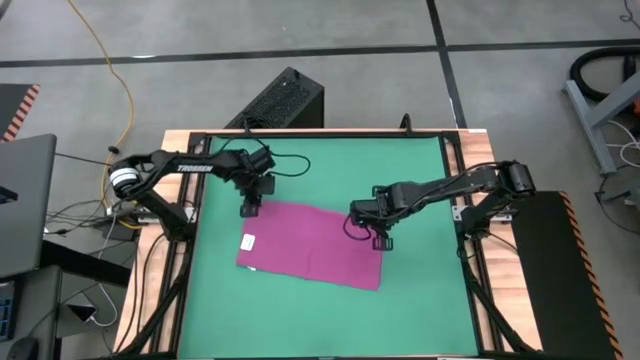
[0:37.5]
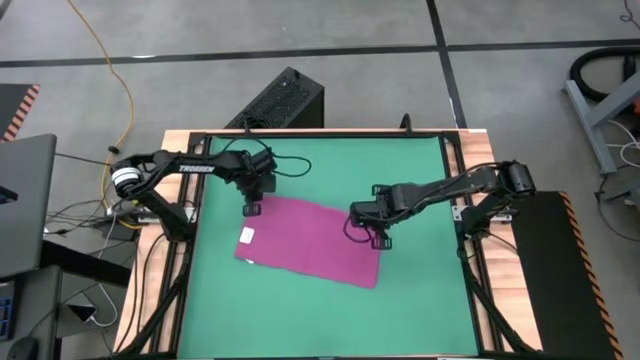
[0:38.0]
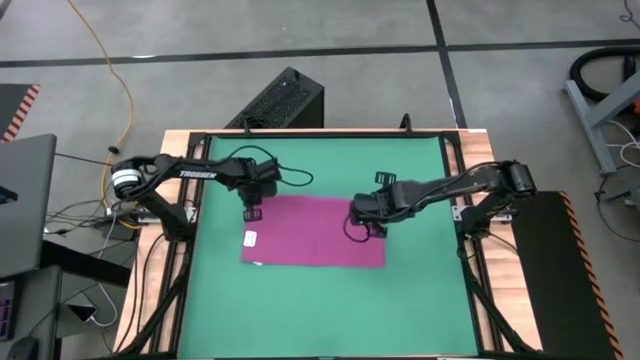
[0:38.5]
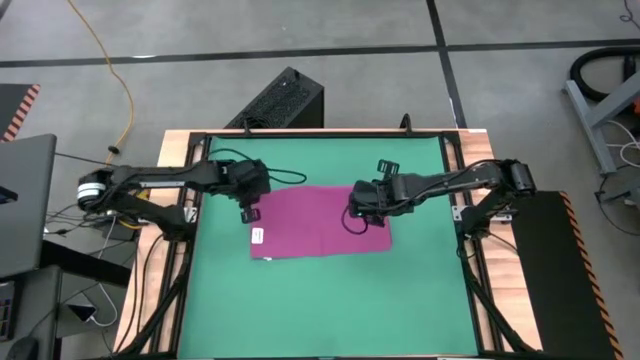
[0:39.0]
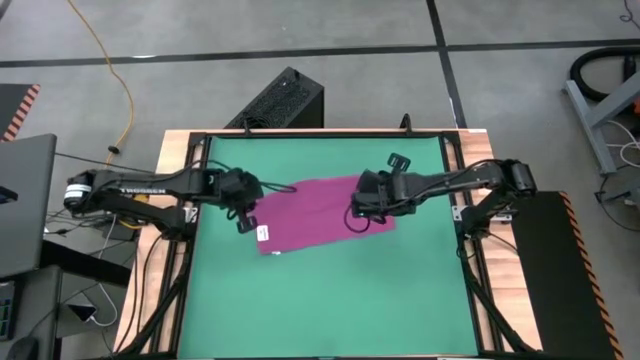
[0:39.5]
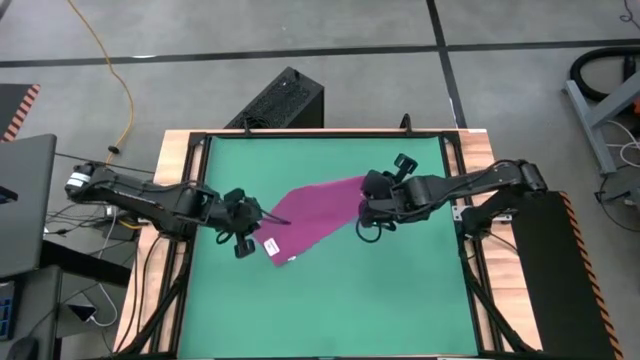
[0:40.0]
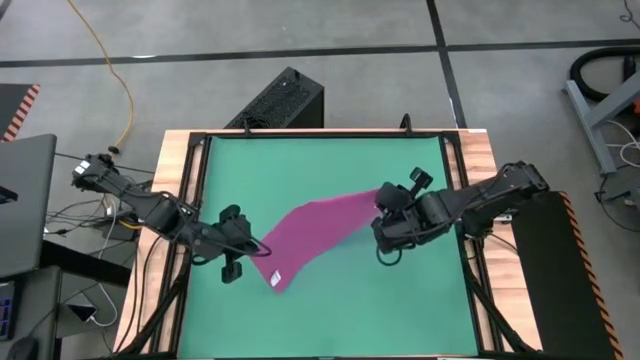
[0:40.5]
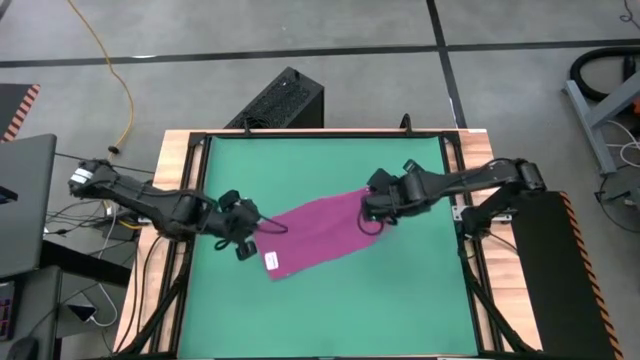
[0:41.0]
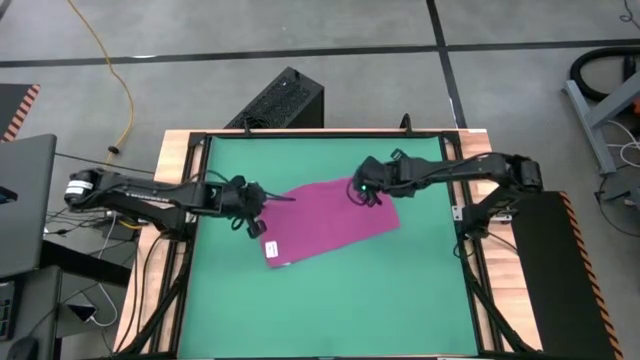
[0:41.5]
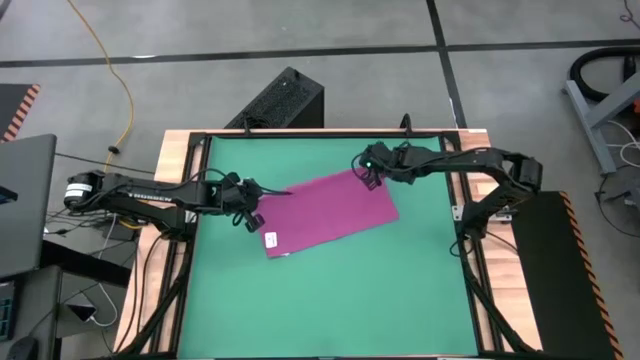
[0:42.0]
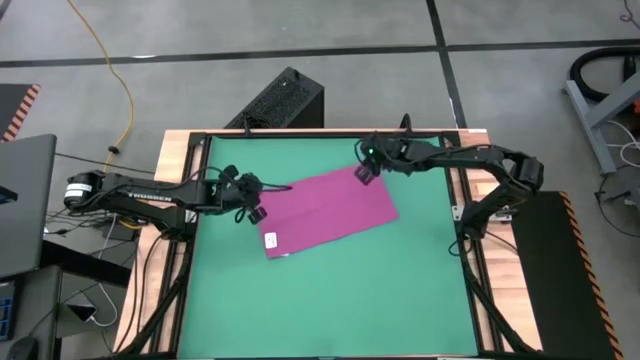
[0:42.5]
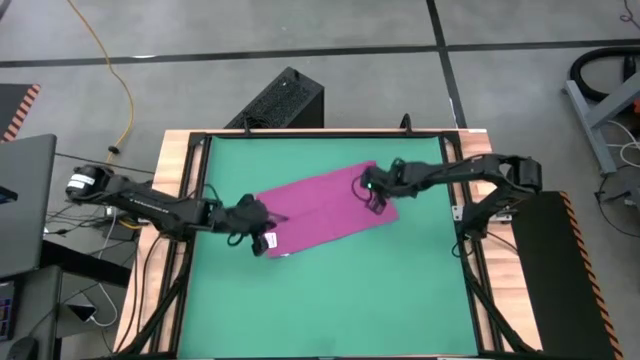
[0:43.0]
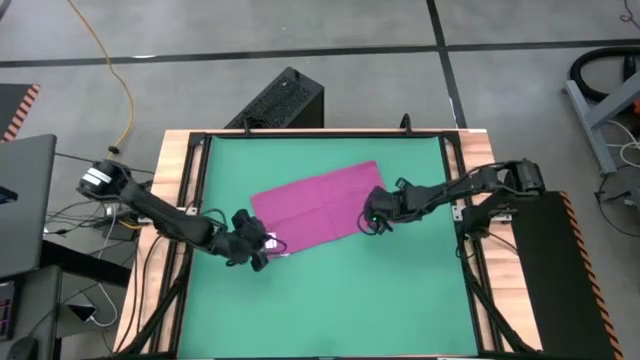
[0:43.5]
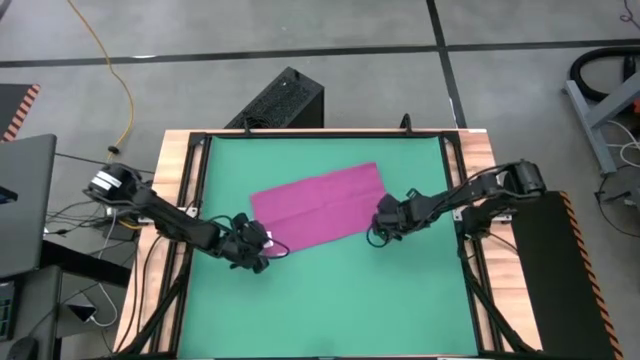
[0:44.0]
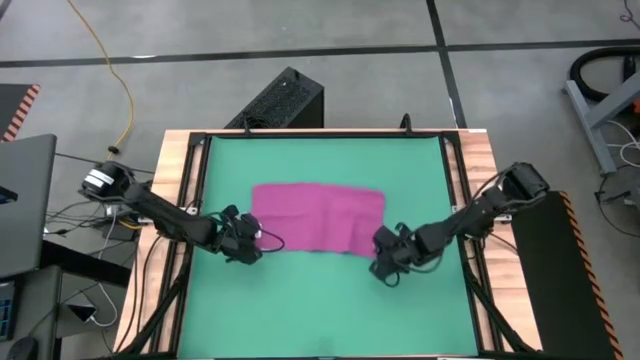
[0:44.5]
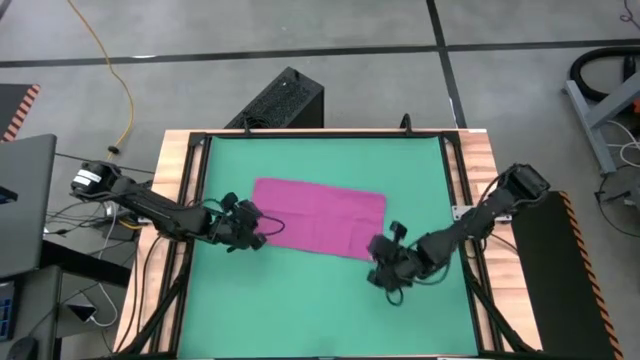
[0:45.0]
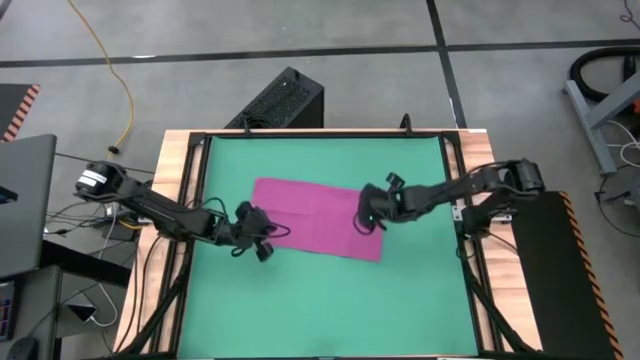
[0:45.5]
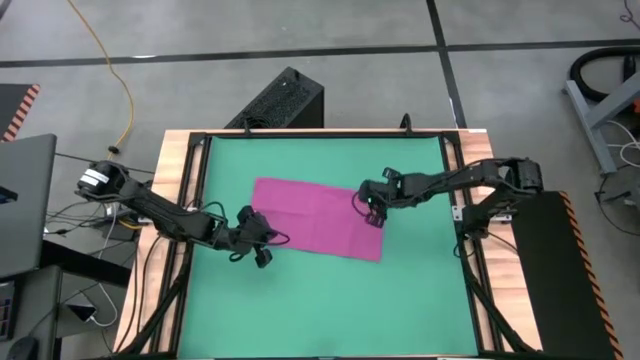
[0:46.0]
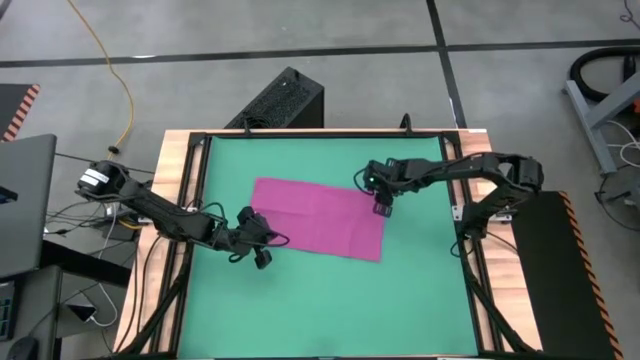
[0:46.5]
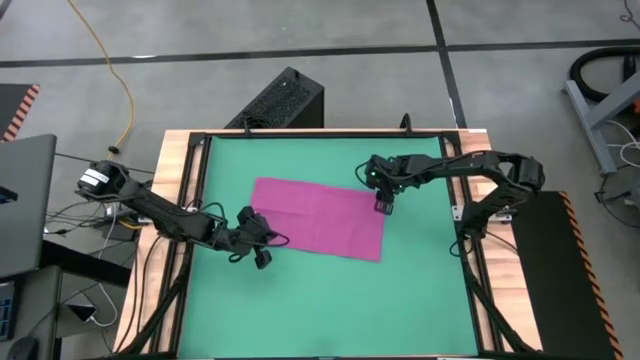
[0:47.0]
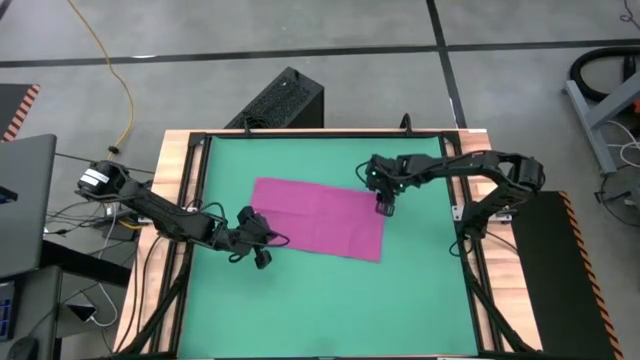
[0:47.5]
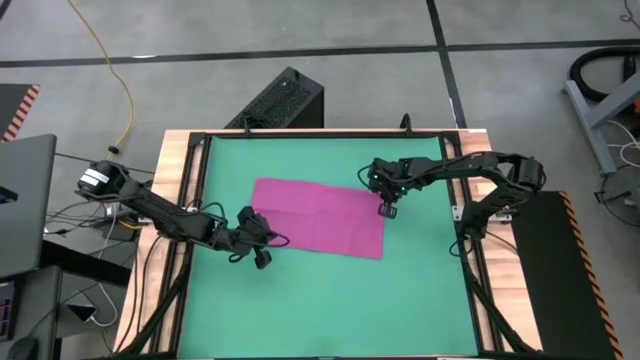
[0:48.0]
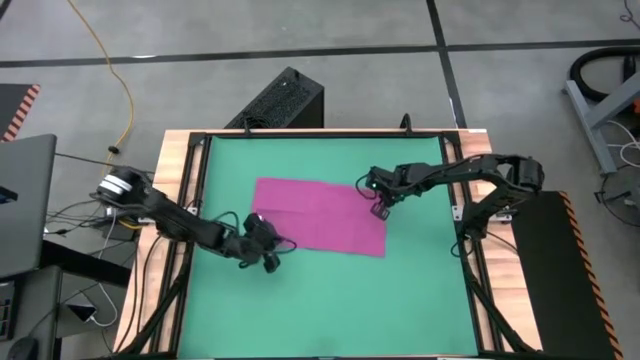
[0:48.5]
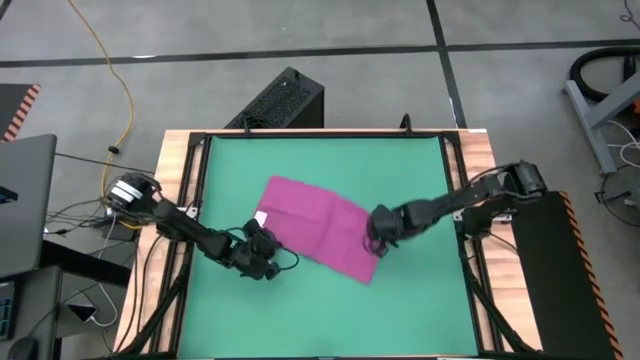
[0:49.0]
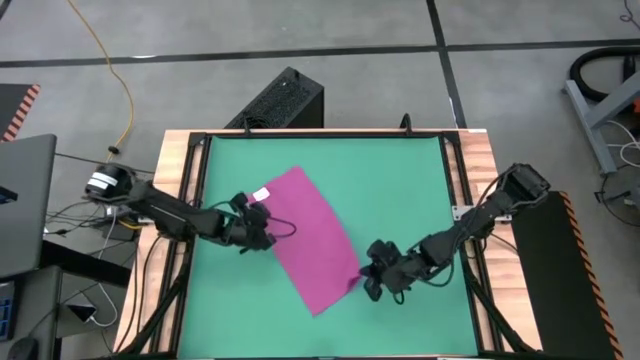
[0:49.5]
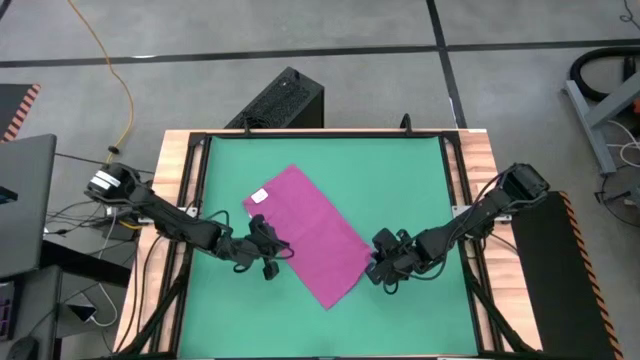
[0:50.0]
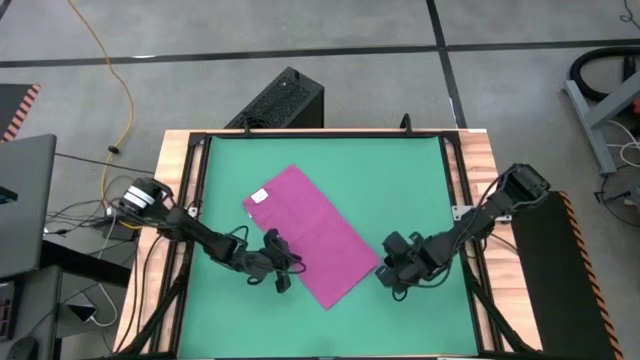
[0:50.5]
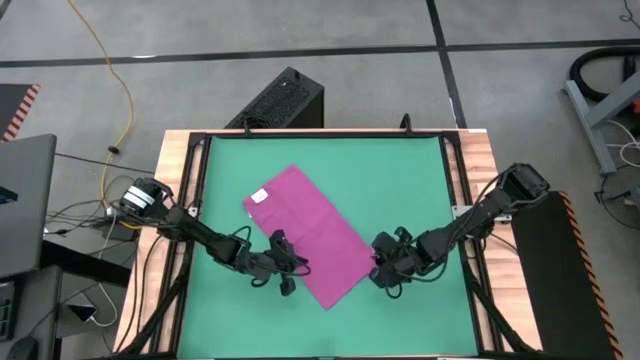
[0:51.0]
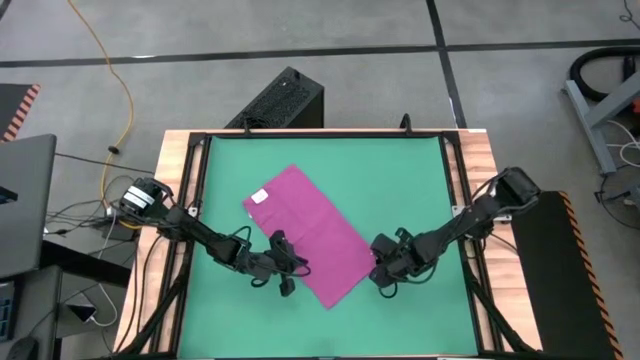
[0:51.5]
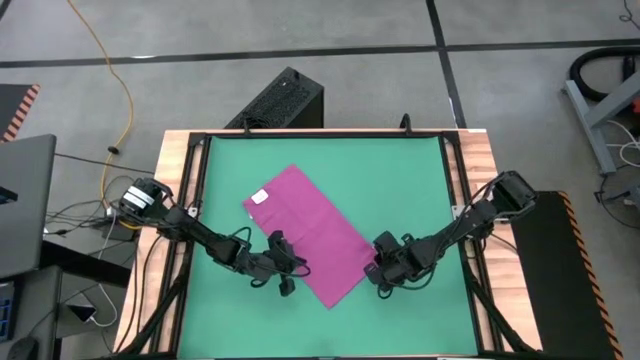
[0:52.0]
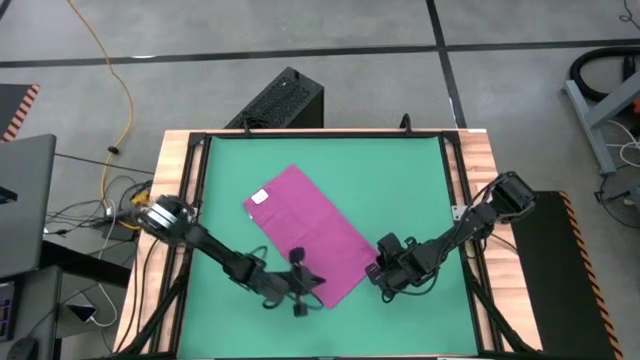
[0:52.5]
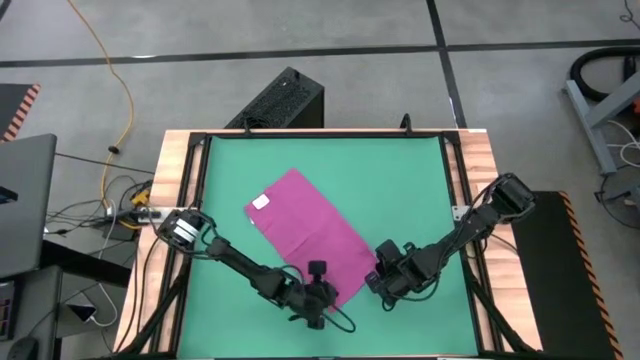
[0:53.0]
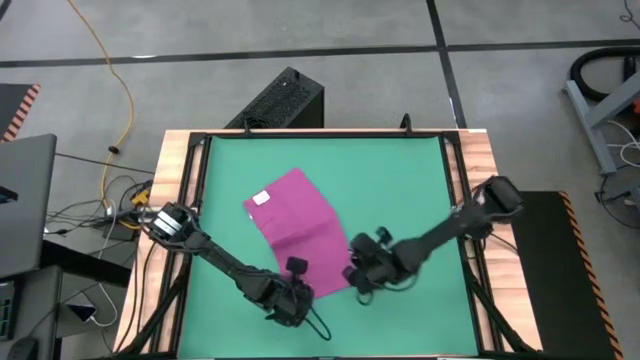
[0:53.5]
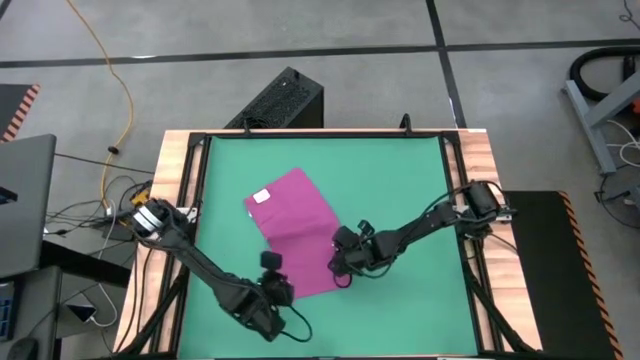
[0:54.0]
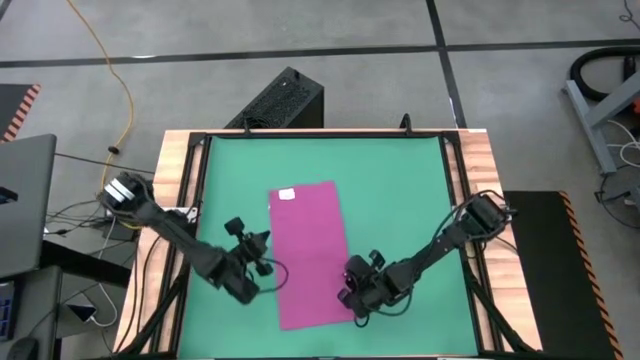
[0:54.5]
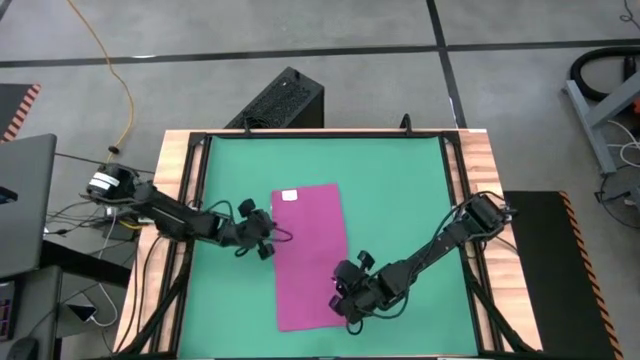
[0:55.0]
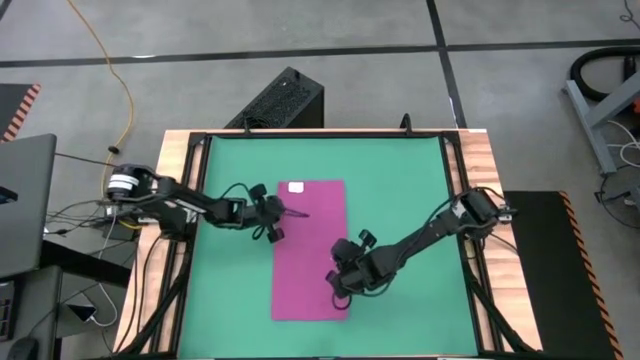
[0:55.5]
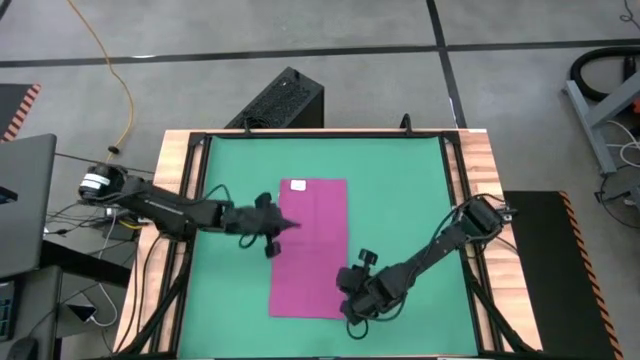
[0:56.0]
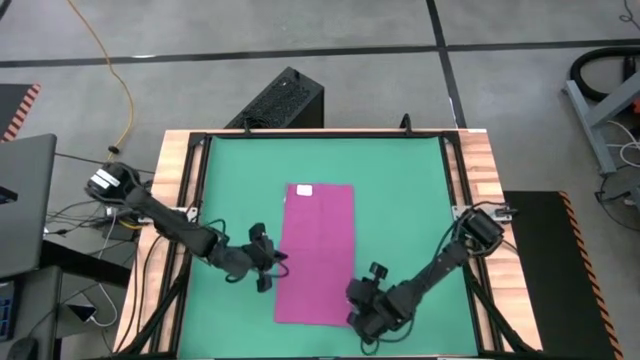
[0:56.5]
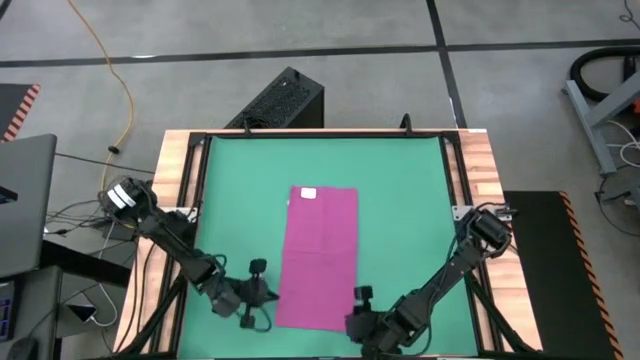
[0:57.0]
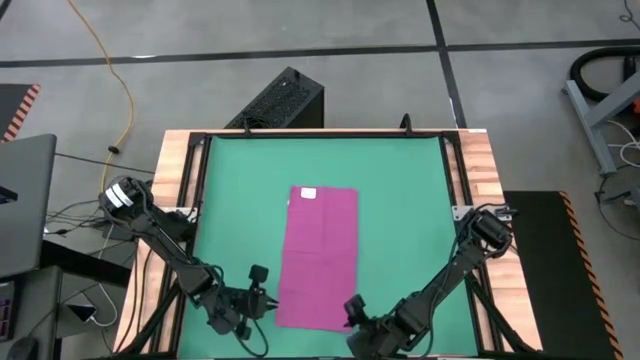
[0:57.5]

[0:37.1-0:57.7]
Task: Roll towel
Roll the pink towel
